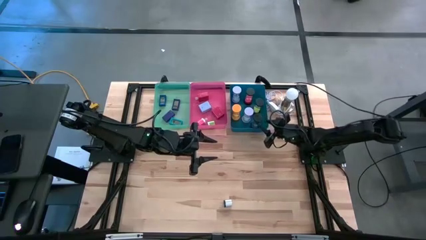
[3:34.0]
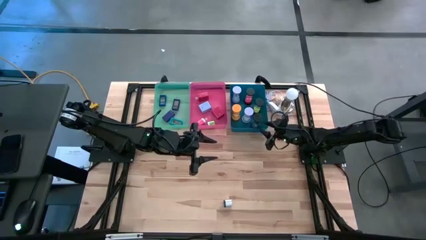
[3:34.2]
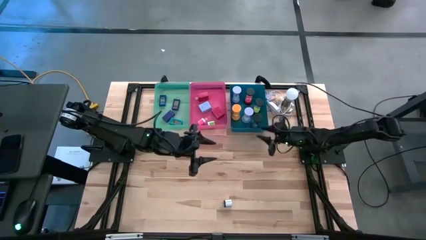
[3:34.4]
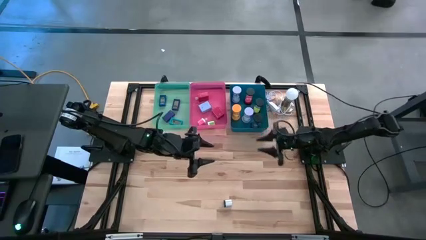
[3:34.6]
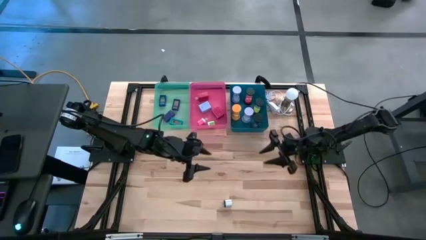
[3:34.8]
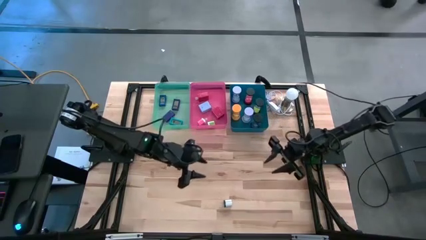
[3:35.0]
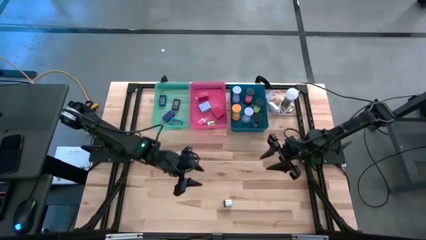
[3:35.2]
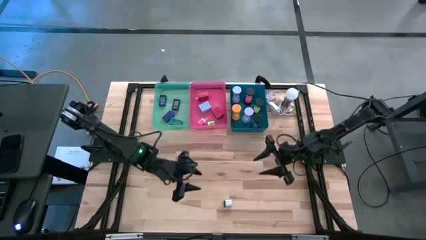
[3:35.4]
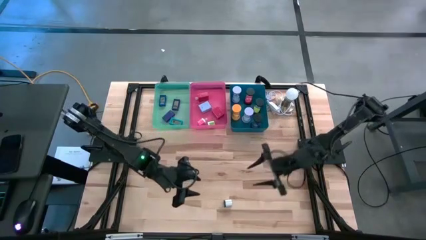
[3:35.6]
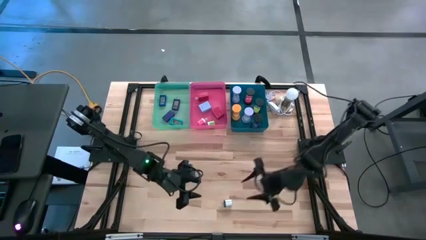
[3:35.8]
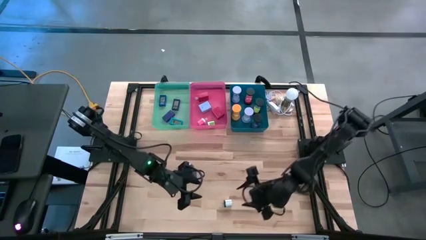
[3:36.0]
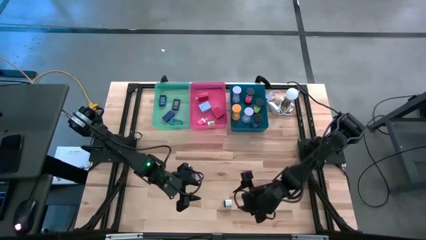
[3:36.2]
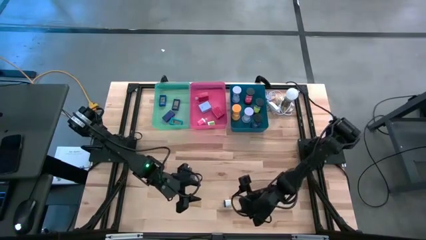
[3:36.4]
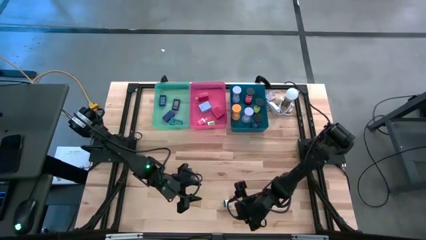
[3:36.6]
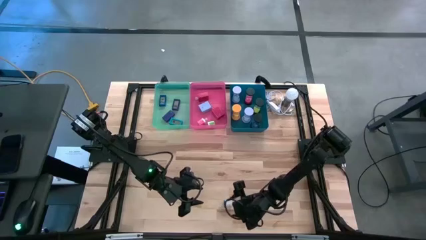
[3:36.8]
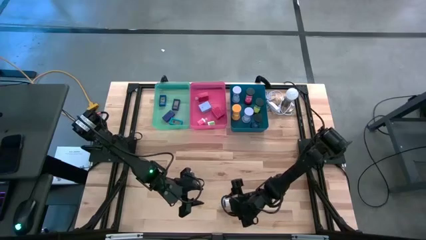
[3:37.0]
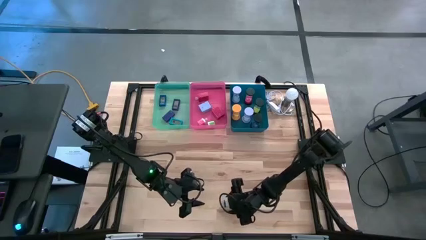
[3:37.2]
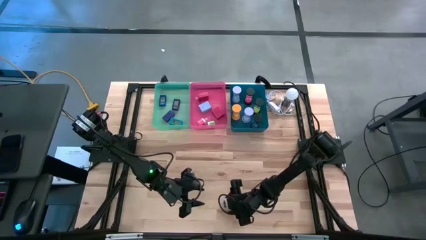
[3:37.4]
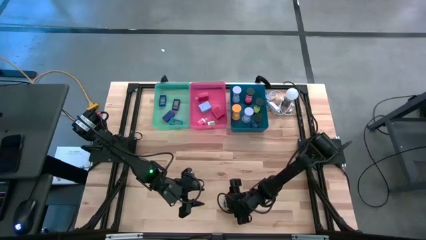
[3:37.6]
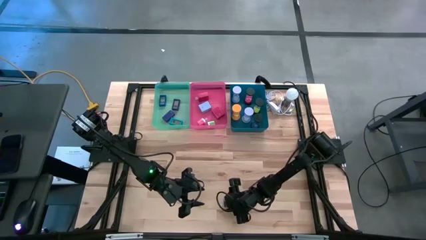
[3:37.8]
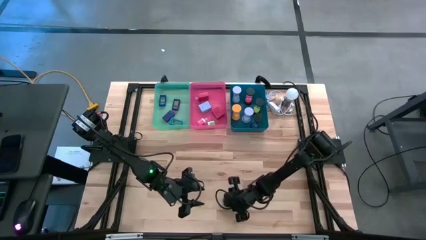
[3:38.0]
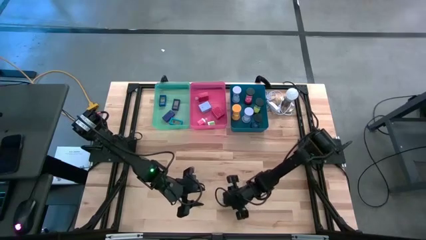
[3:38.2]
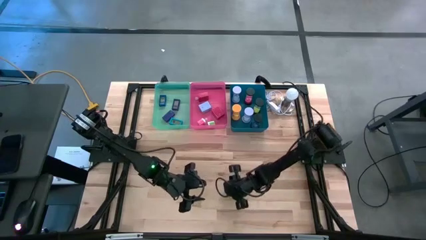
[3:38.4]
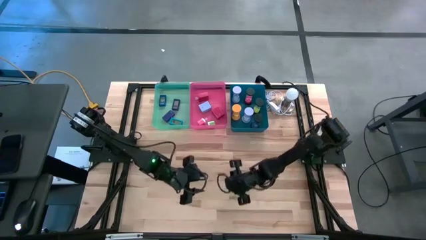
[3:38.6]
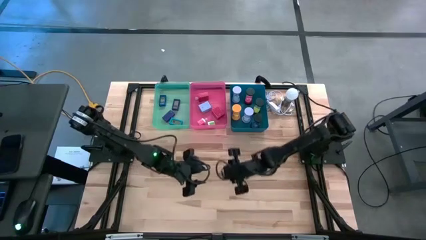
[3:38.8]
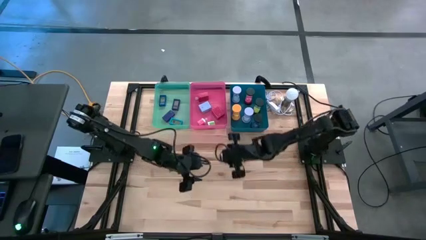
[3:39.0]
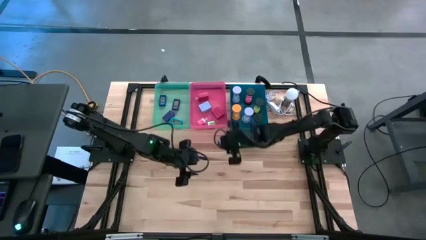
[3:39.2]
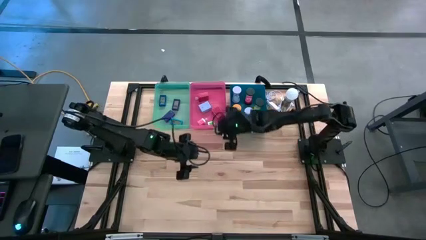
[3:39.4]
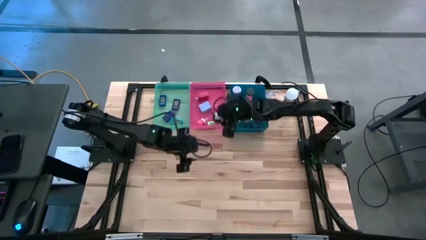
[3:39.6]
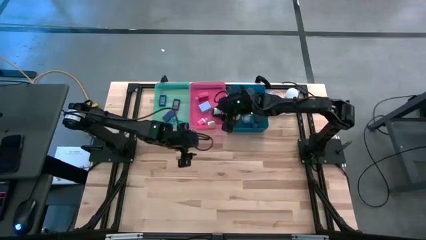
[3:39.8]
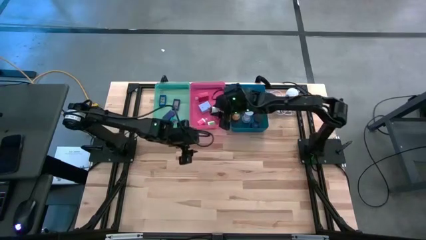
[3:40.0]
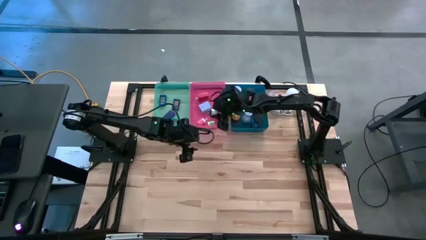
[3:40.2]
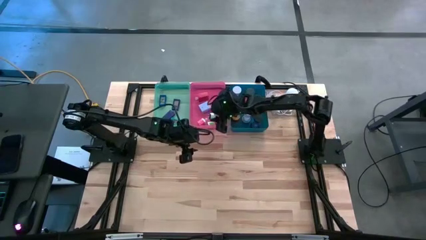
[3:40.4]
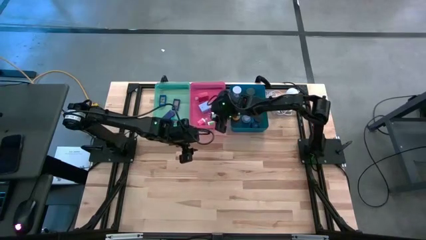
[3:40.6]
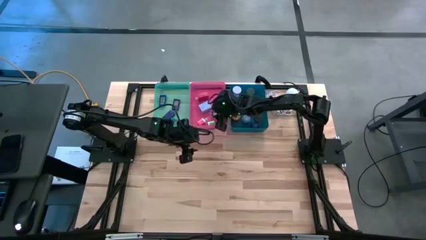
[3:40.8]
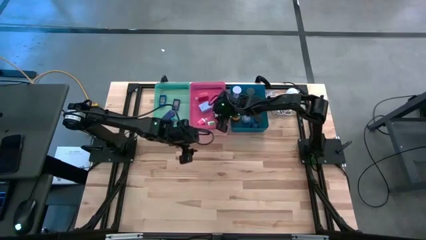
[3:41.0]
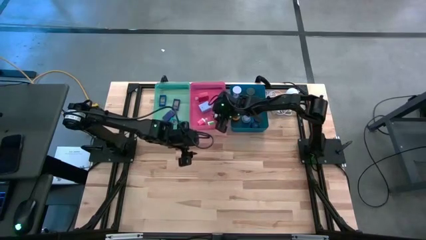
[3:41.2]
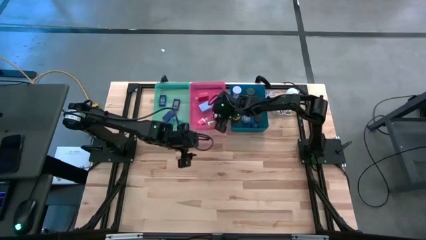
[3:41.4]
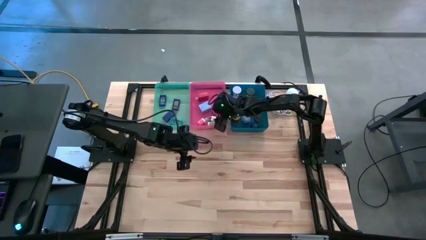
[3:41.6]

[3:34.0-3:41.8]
Task: Pick & Place Office items
Put the small white adapter into the pink bin

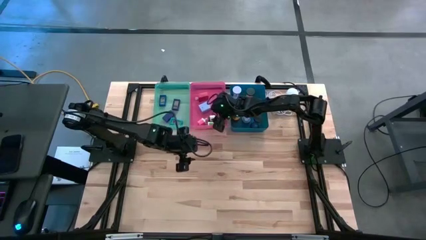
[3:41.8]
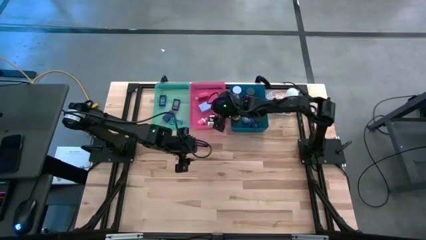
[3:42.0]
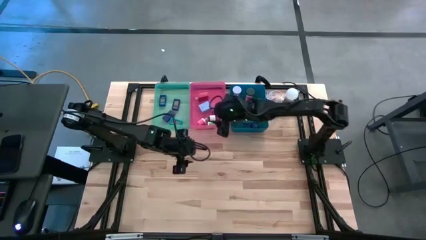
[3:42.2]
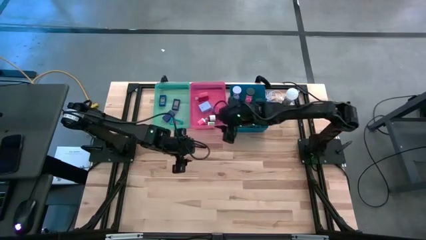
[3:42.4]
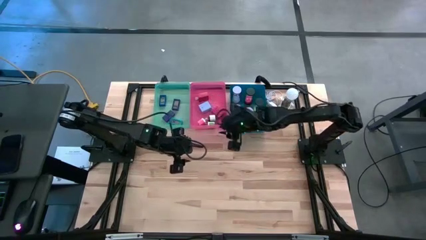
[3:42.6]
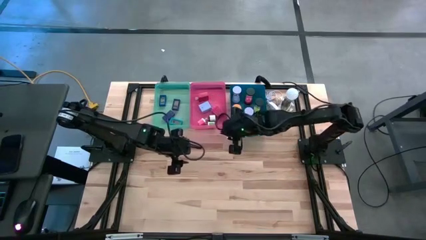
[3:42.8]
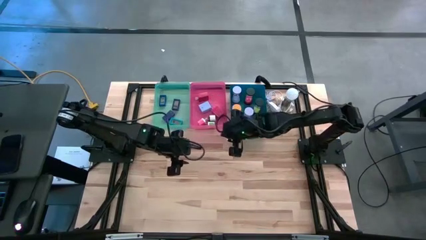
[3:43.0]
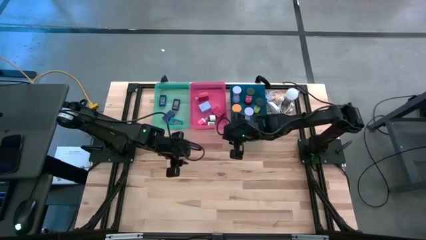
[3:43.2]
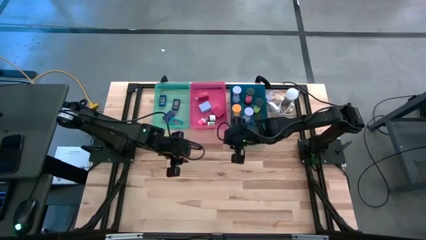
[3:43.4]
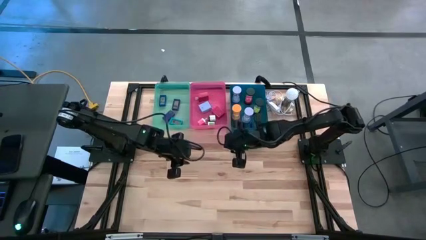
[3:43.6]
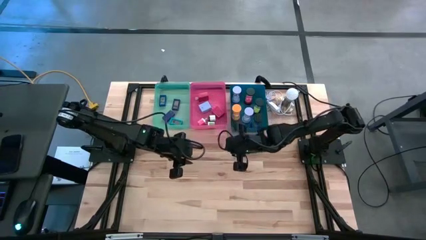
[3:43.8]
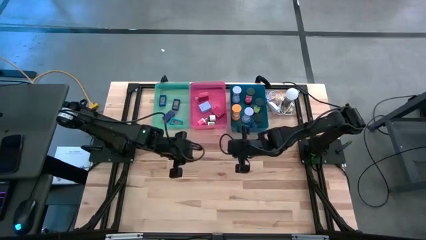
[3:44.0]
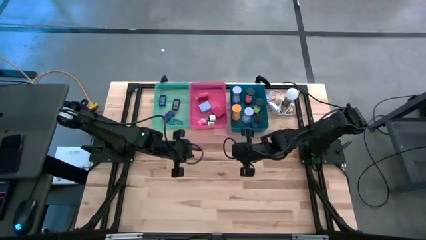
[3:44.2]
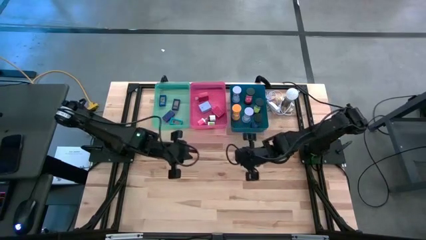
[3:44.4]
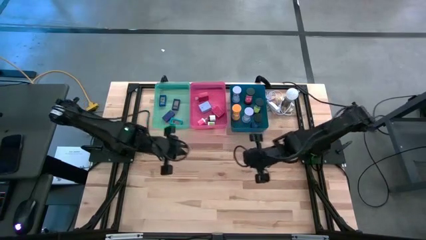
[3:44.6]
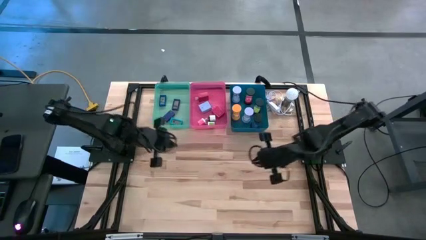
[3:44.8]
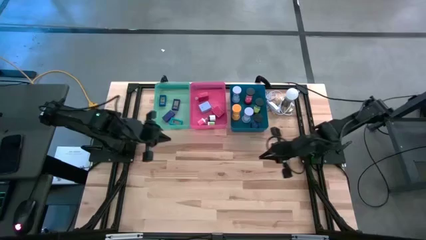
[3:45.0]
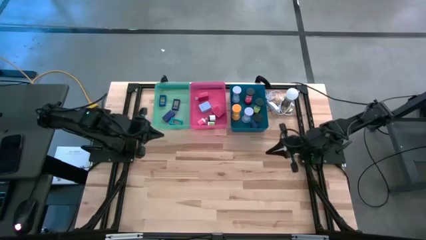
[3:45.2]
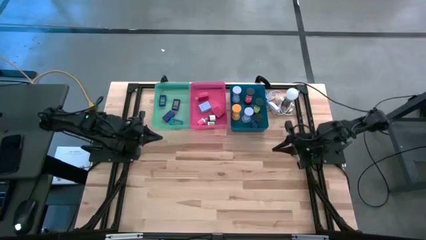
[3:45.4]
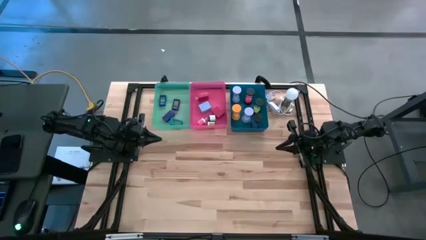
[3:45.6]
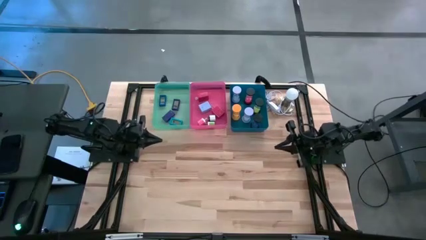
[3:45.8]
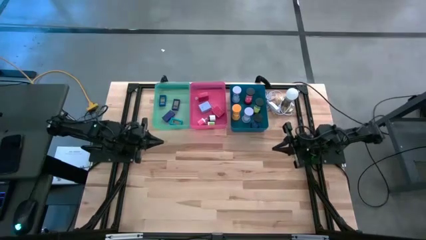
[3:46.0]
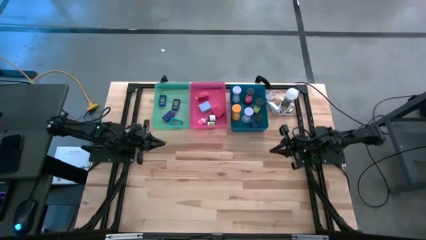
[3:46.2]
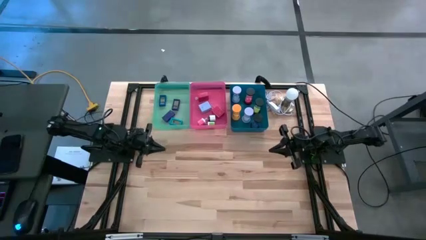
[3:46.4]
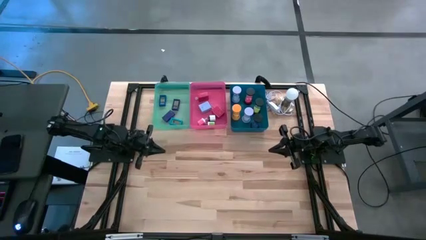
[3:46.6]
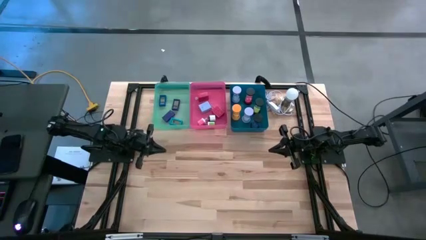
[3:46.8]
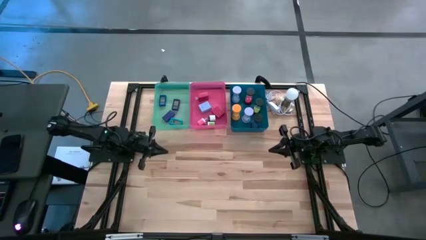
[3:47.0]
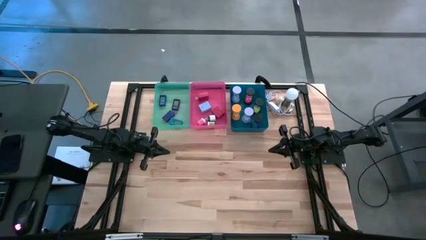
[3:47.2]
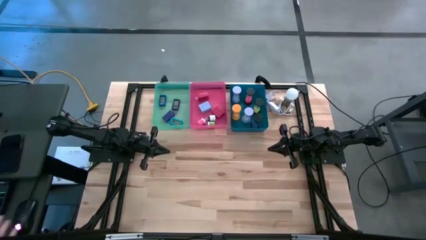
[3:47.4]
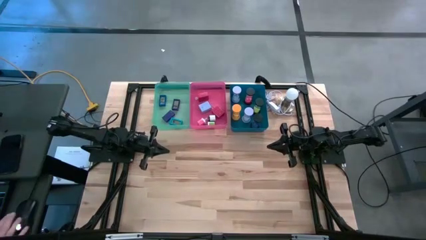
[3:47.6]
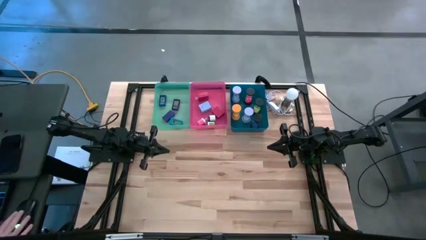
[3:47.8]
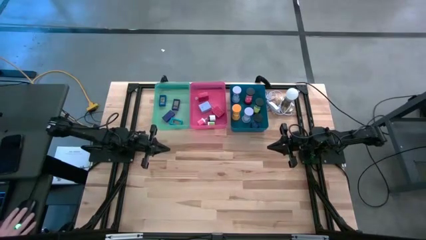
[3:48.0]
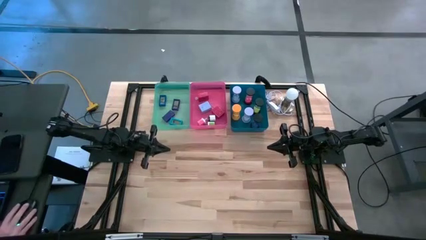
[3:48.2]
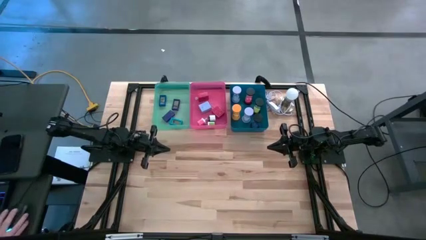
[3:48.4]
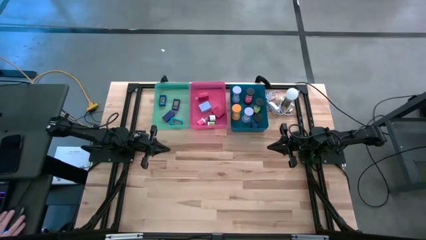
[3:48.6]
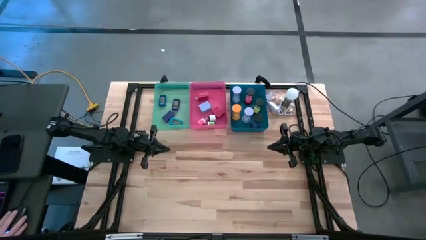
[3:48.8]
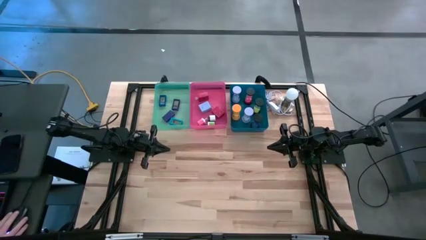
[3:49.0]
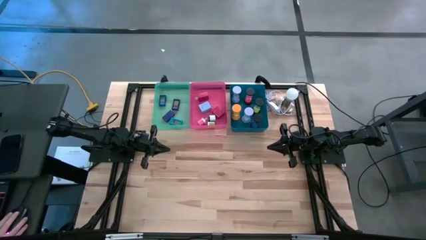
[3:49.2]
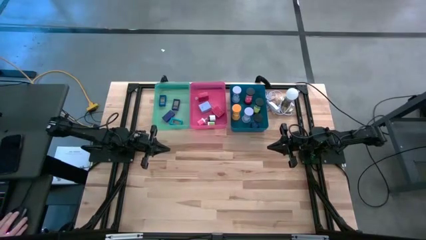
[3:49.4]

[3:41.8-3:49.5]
Return to home position

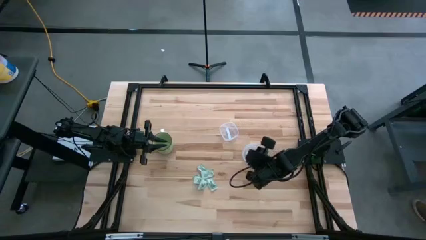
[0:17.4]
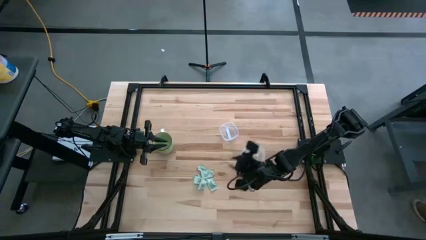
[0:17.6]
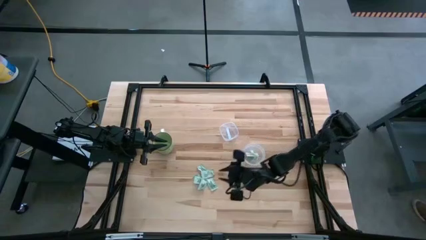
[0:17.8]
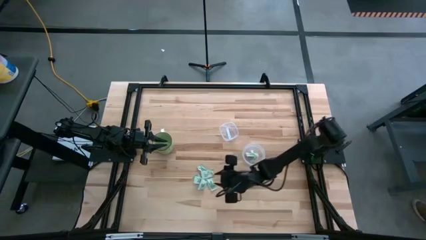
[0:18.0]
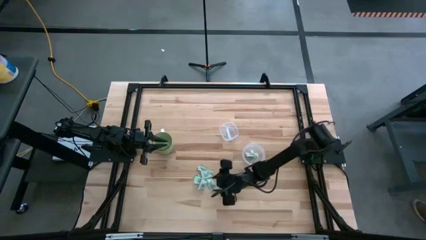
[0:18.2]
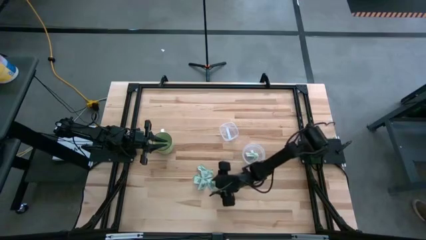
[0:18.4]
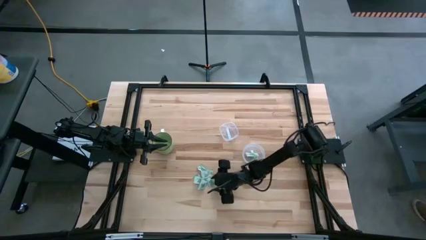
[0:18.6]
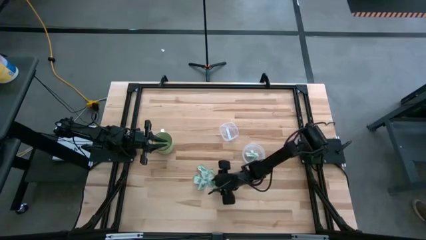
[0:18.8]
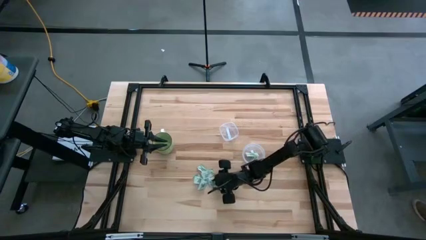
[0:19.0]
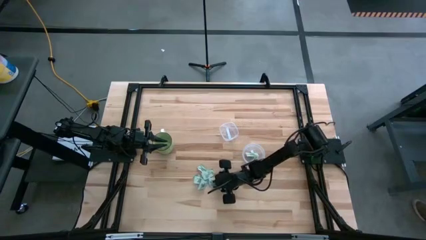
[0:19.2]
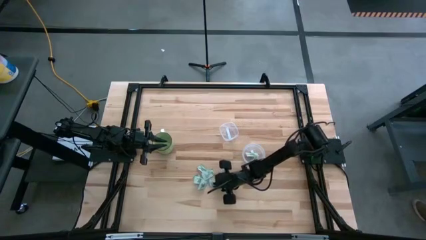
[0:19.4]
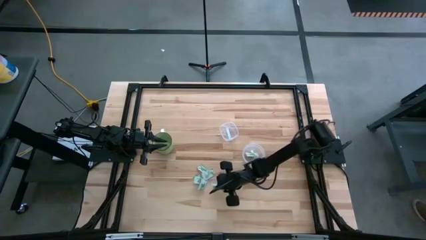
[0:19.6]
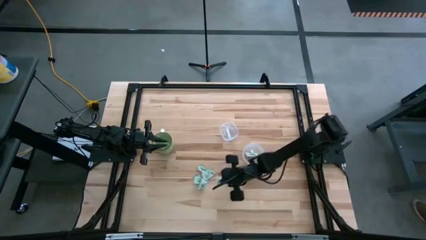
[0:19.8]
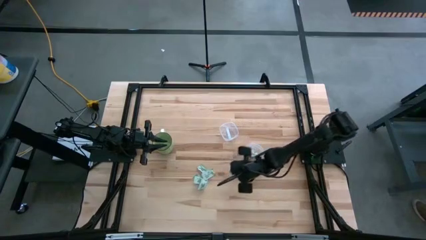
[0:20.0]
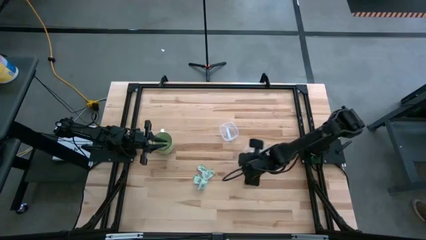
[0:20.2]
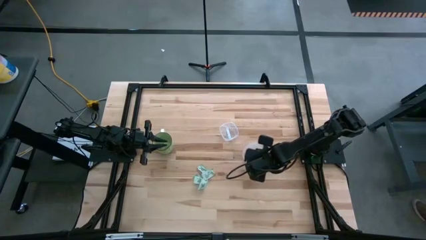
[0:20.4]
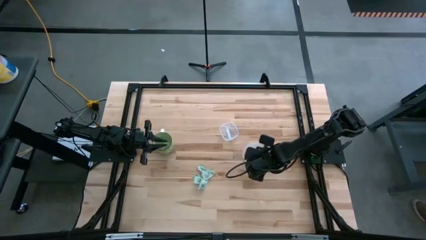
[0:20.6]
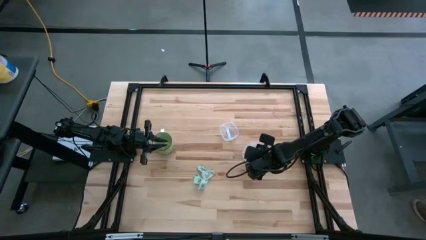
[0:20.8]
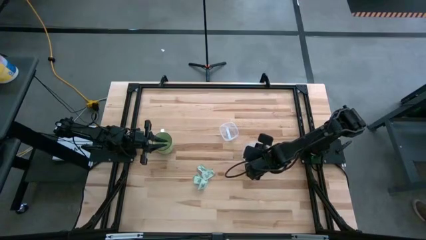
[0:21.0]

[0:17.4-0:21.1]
Task: Pick and place Stevia / Truvia into bins
Put the stevia packet into the bottom transparent container
